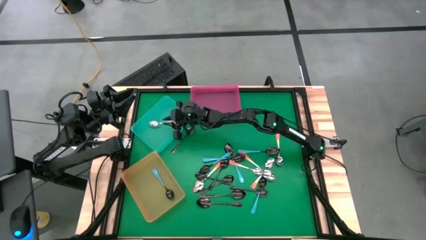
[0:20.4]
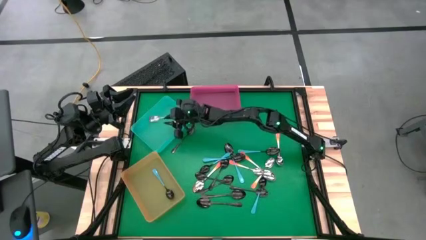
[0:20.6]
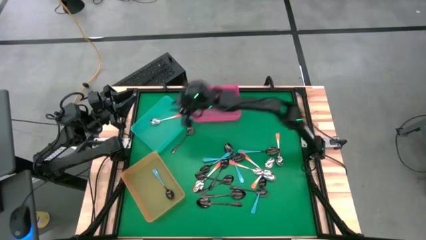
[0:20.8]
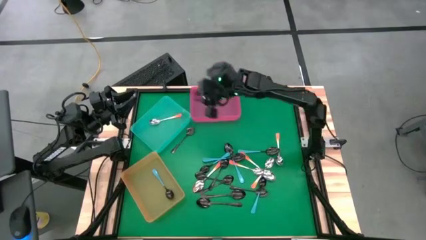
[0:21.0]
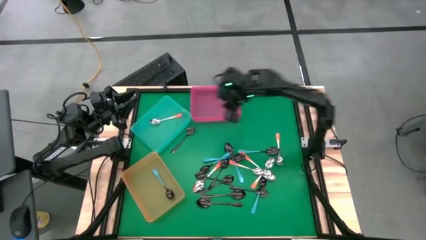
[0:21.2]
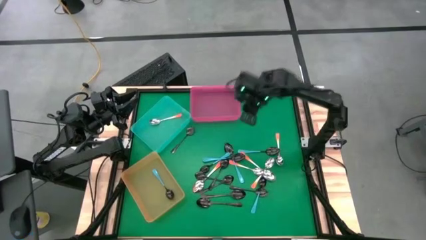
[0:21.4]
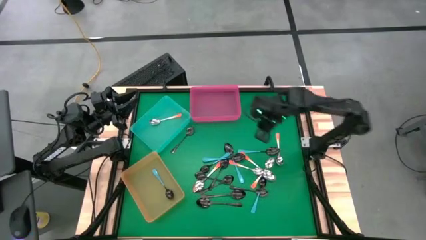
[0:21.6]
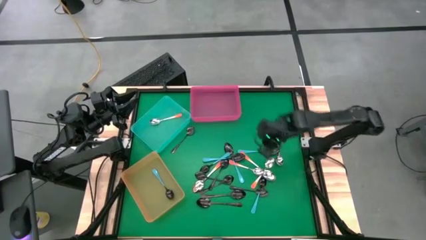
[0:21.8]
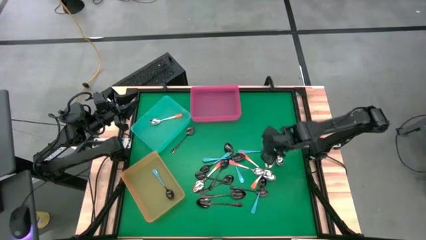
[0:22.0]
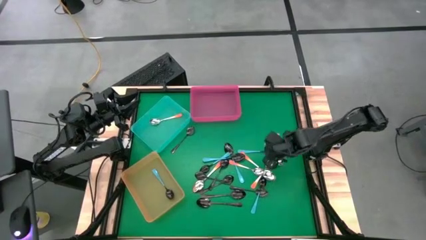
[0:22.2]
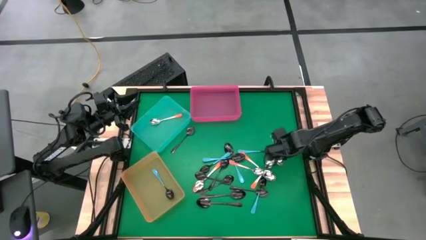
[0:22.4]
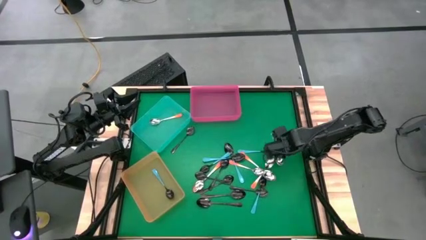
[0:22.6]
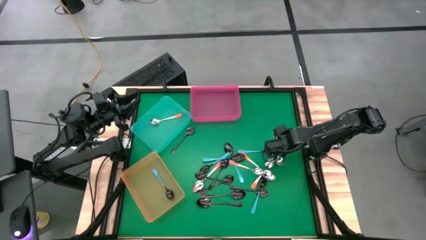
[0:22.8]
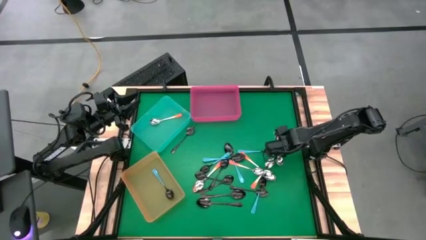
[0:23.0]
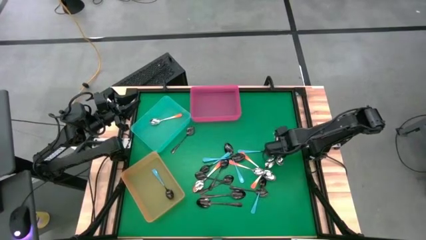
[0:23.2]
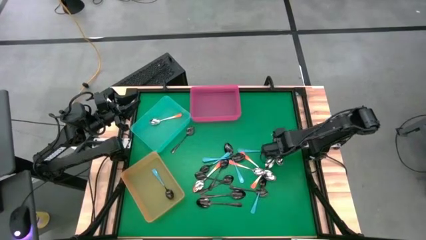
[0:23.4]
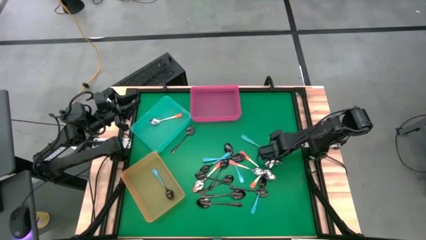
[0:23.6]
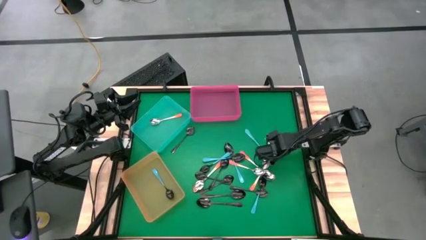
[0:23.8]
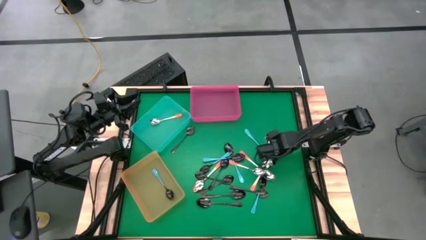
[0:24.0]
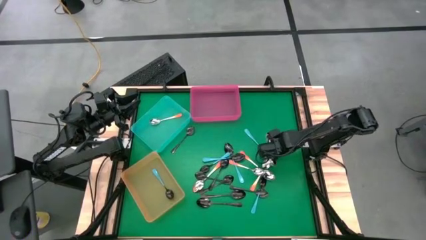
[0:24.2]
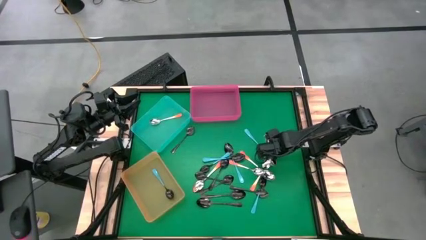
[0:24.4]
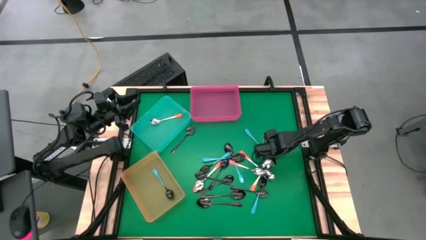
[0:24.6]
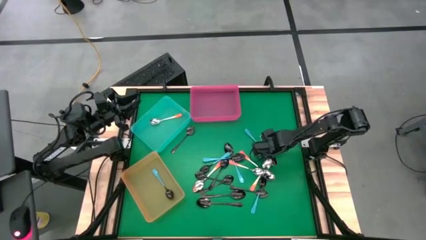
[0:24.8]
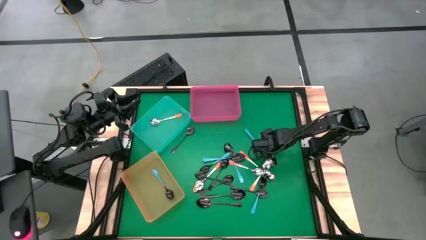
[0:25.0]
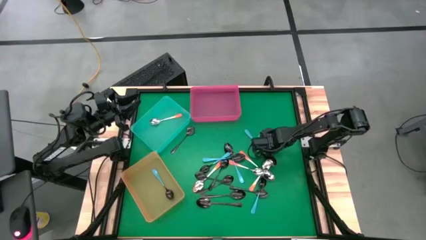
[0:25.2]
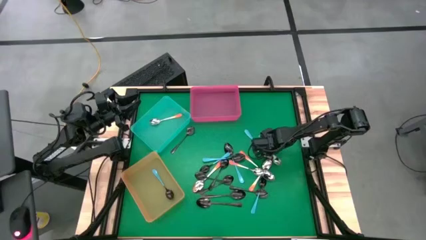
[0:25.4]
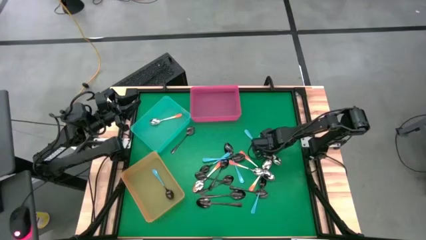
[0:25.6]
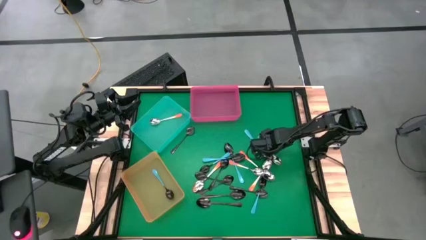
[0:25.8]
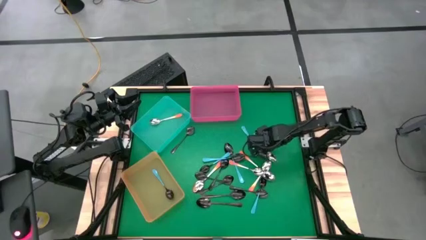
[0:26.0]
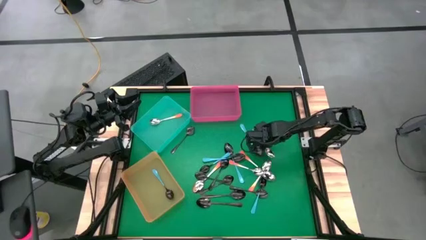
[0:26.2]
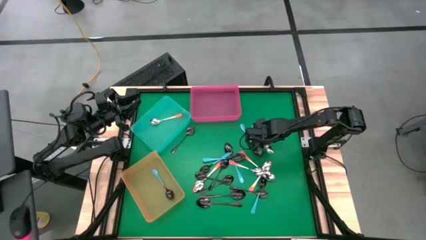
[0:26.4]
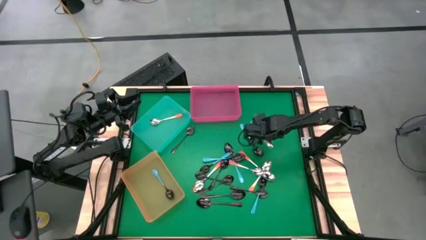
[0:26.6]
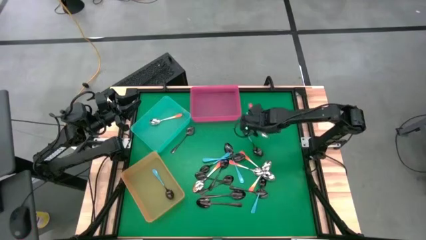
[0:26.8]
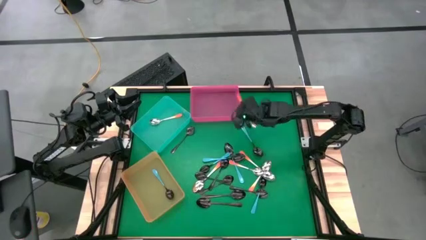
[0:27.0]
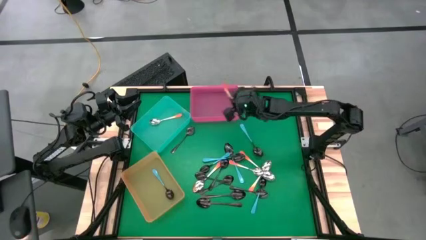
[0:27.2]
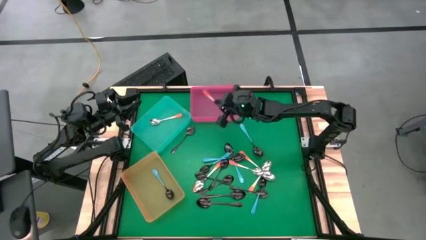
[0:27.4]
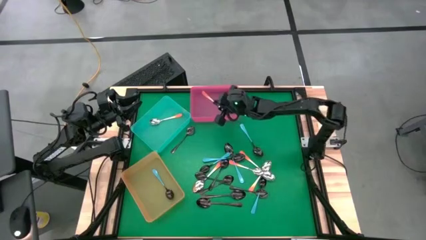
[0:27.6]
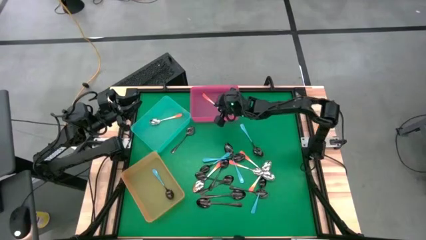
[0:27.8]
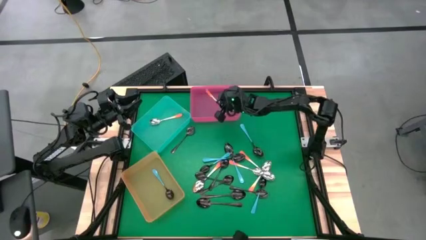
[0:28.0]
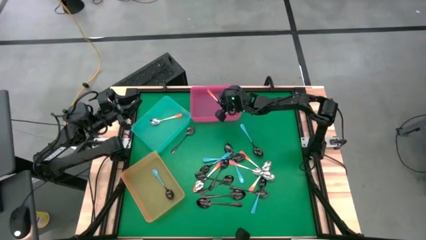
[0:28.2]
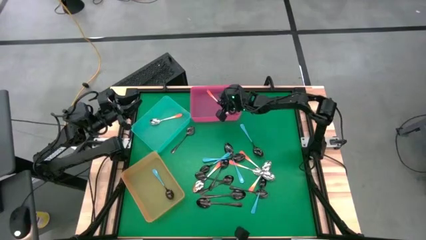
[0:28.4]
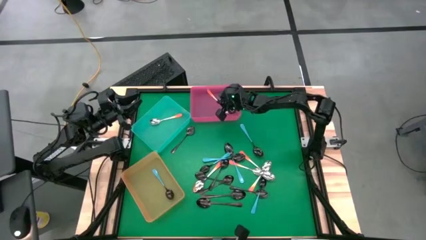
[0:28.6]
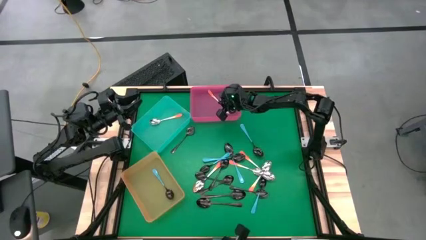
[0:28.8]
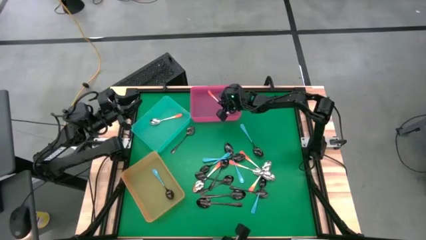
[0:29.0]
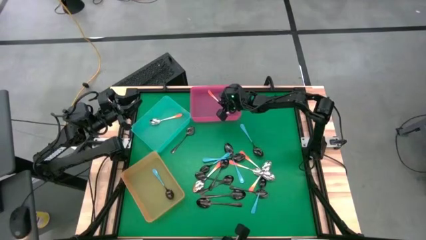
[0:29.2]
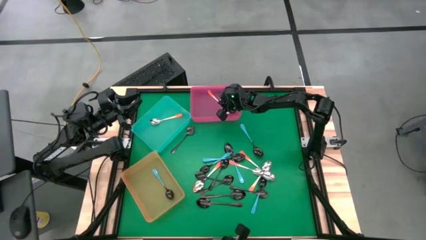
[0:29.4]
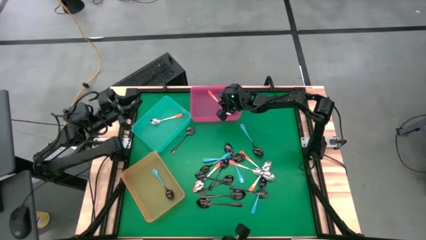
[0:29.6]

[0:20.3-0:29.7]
Task: Sort silverware by color (type)
Put the orange spoon into the blue bin

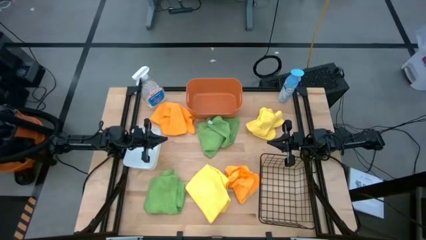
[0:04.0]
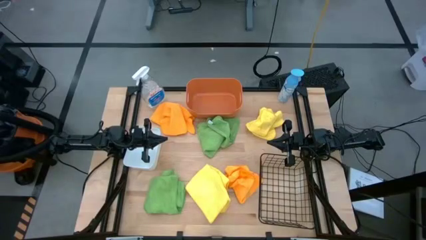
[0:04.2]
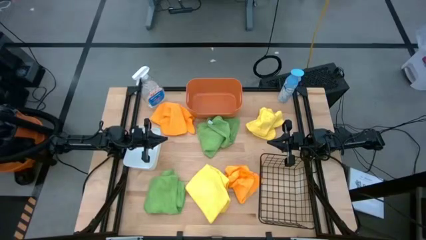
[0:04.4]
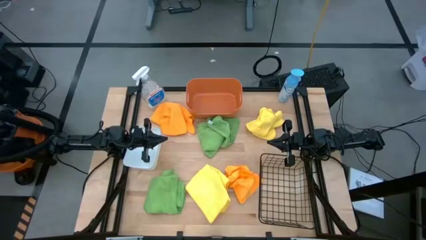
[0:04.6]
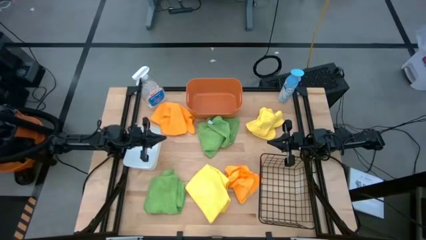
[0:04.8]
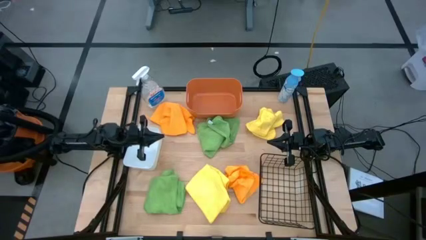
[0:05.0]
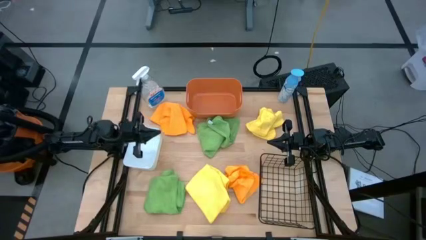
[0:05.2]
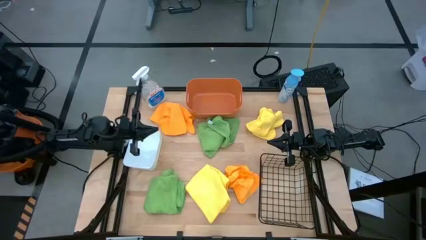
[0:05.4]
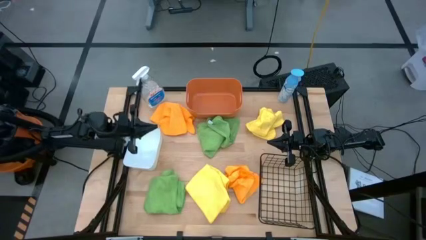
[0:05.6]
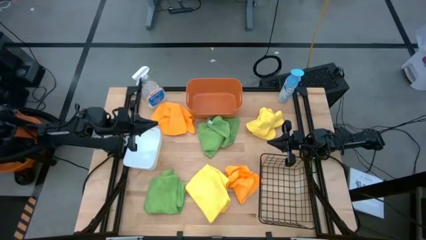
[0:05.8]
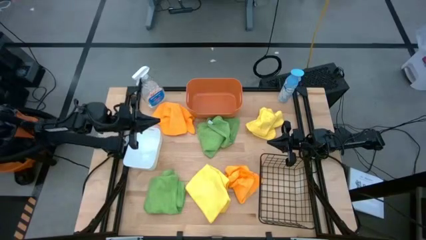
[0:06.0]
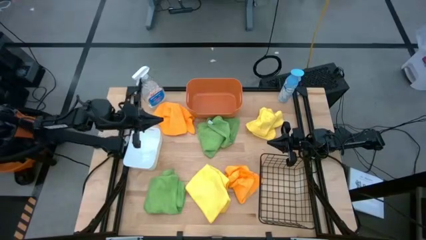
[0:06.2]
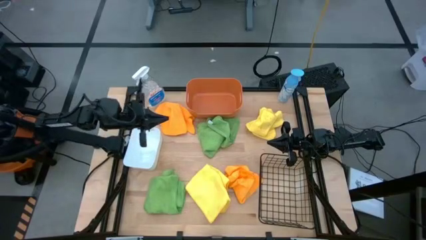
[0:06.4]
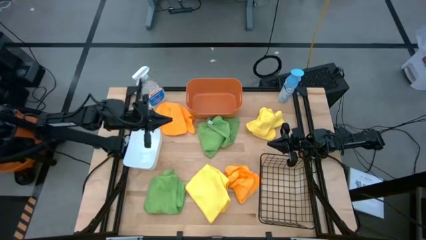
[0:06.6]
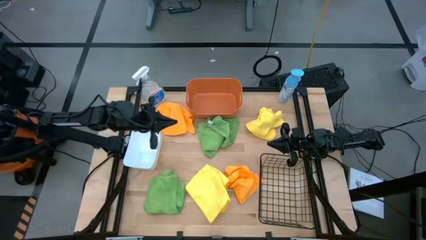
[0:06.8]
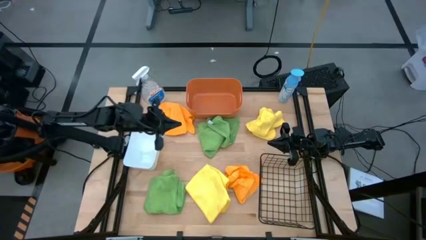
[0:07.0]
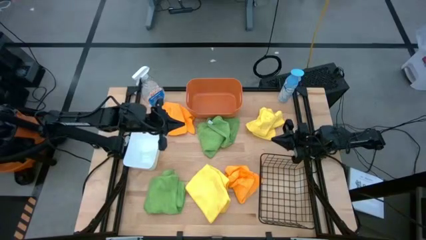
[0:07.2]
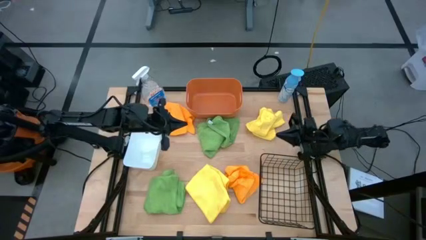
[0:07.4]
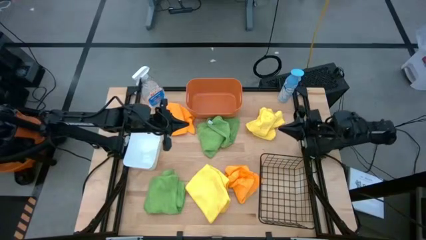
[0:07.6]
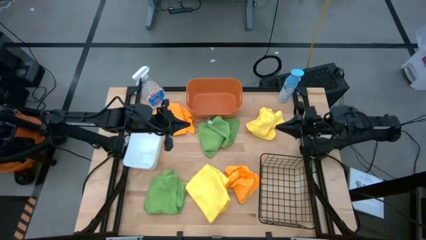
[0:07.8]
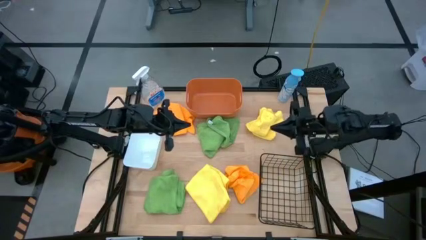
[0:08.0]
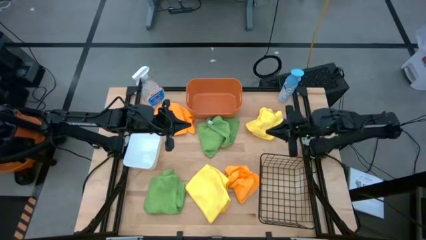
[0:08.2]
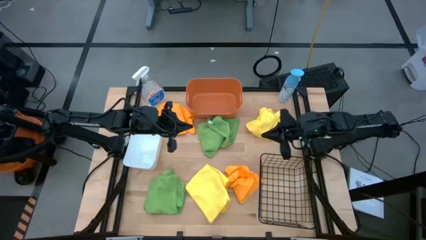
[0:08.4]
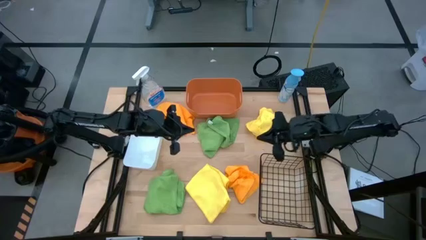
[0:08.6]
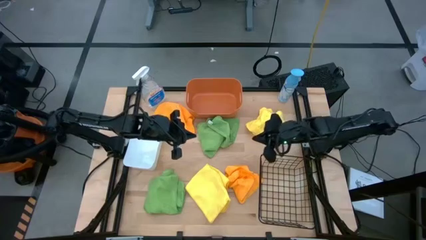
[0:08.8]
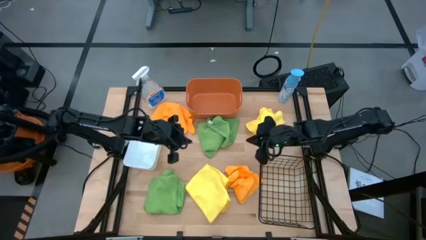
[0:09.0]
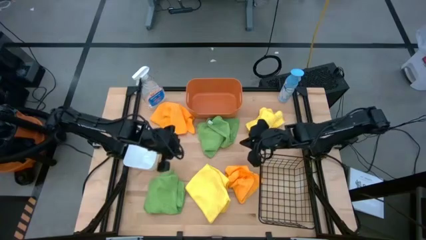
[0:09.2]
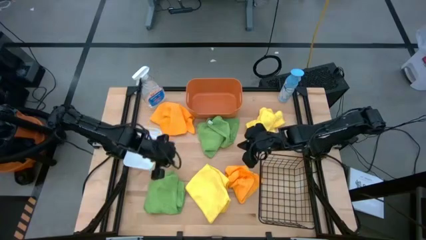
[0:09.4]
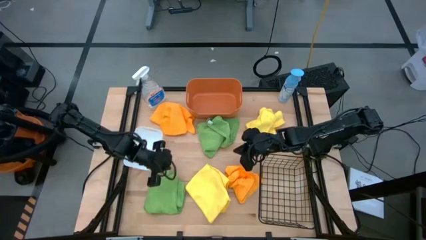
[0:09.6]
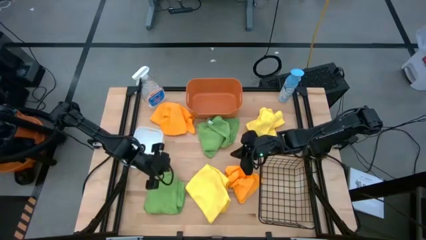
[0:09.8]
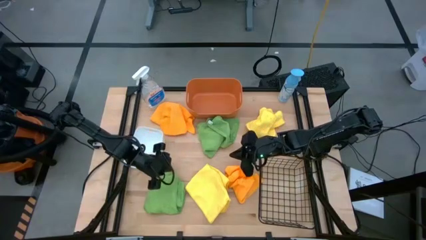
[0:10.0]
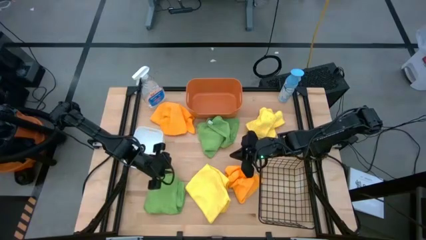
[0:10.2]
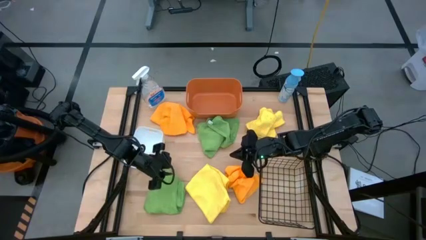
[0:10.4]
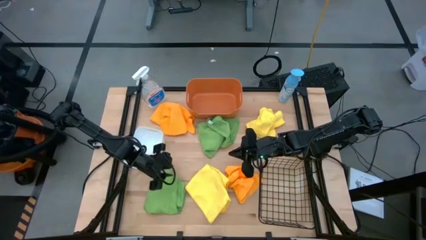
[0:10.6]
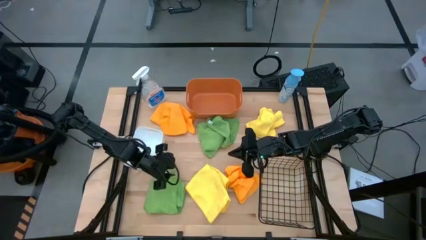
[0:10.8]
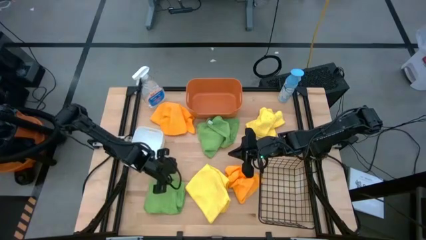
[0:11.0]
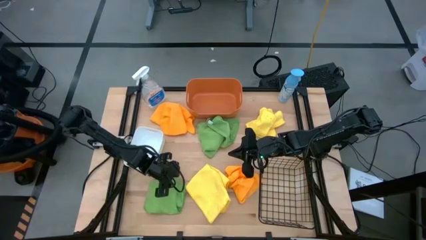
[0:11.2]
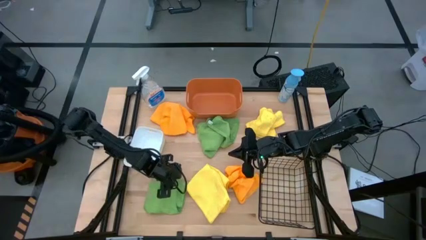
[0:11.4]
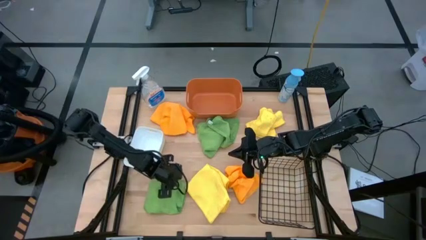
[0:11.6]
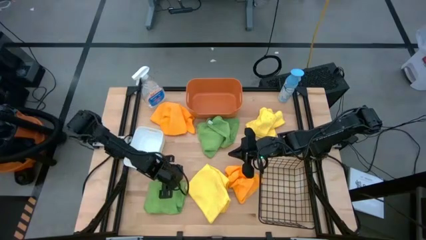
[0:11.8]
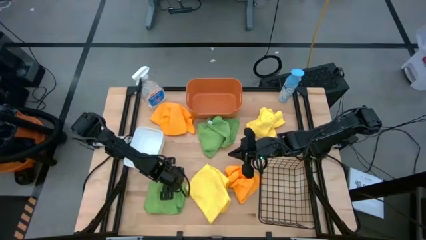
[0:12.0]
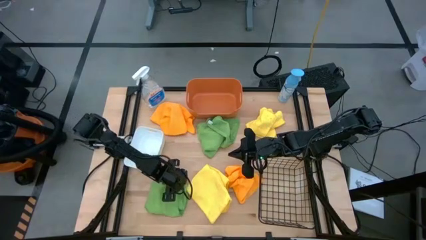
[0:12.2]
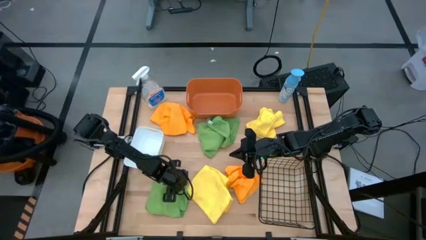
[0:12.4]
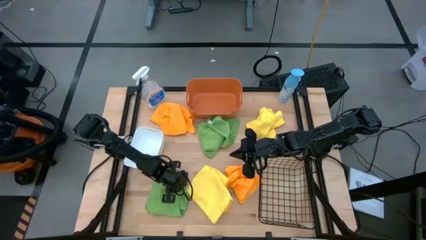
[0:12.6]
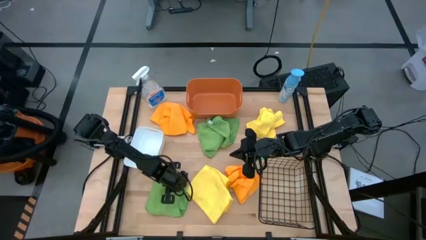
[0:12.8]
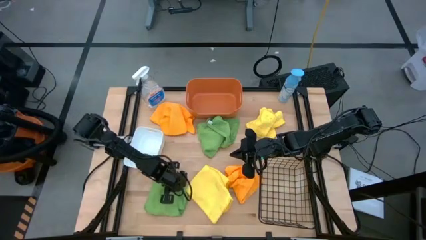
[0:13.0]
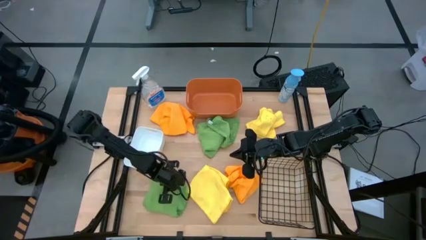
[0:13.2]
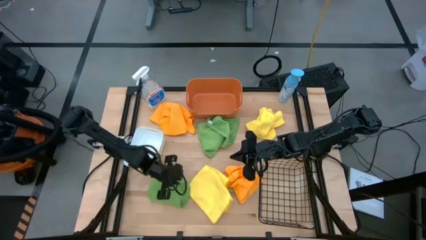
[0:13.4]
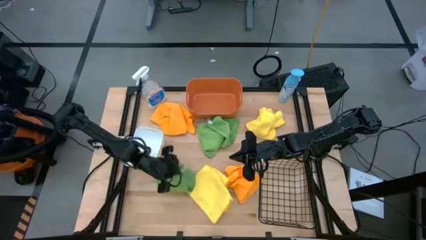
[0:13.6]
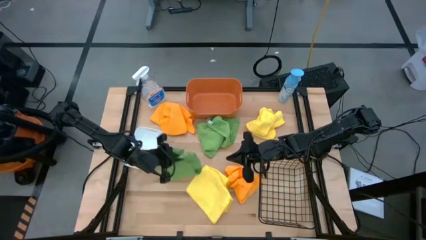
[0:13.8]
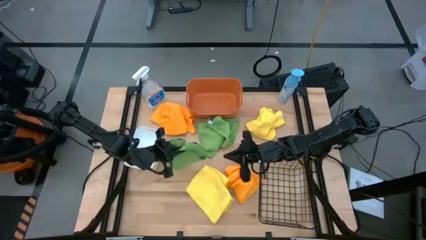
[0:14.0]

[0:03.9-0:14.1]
Task: Sort microfiber towel by color & place in baskets
Put the bottom green microfiber cloth into the orange bin
